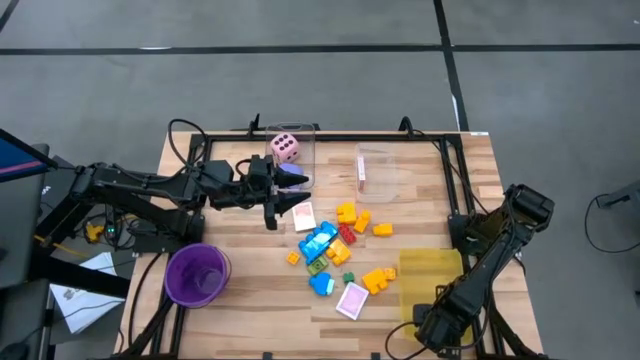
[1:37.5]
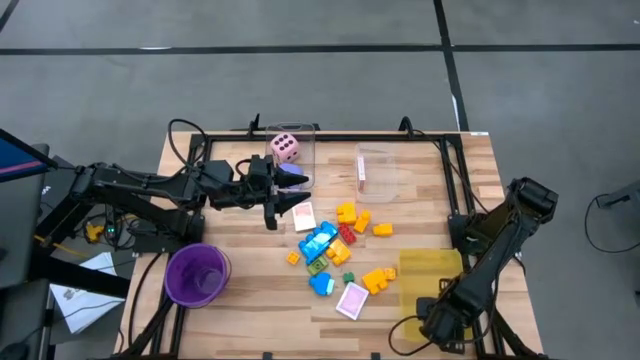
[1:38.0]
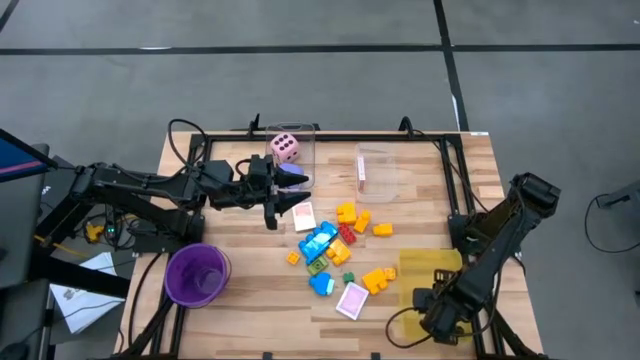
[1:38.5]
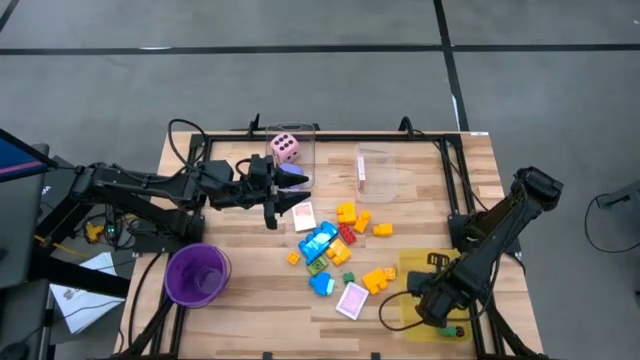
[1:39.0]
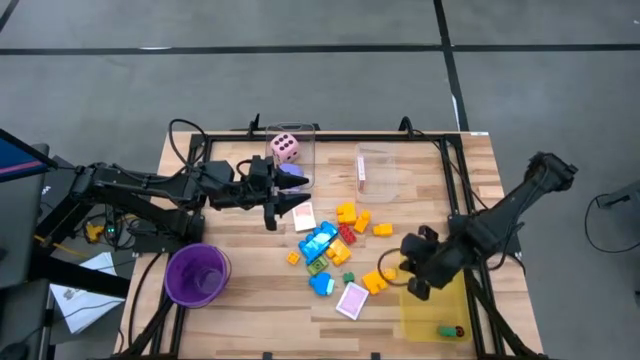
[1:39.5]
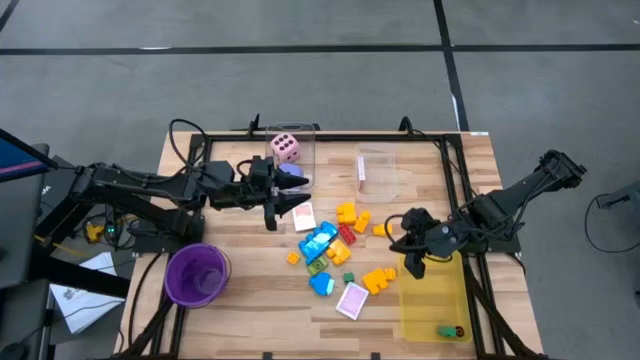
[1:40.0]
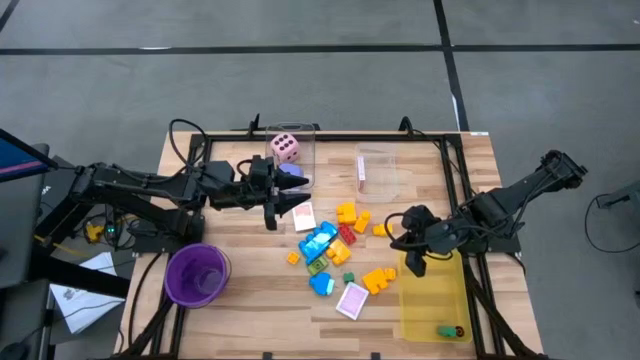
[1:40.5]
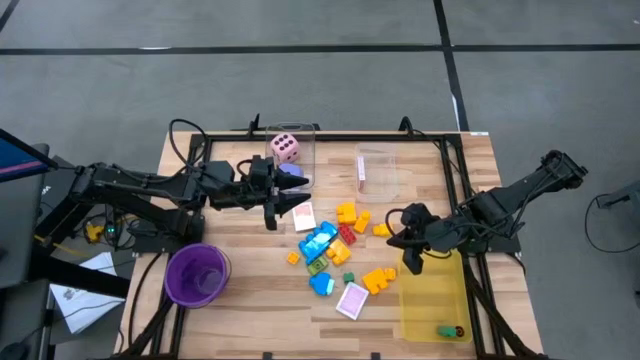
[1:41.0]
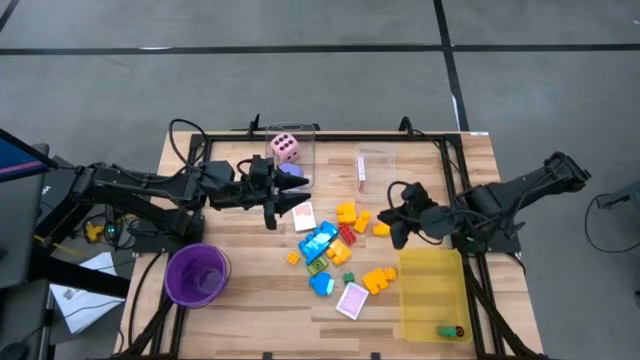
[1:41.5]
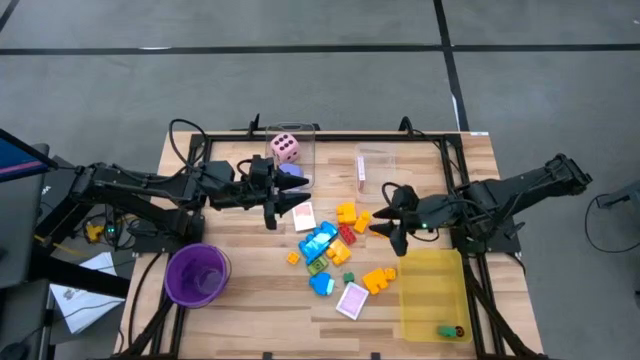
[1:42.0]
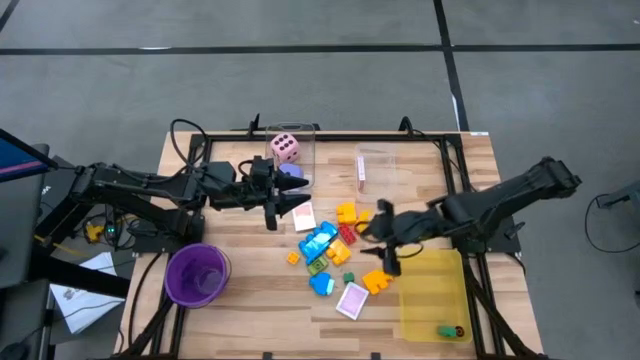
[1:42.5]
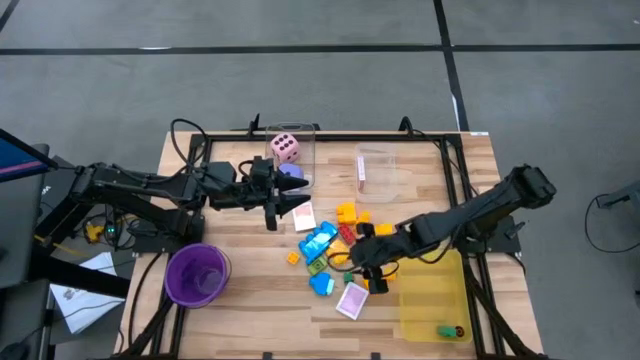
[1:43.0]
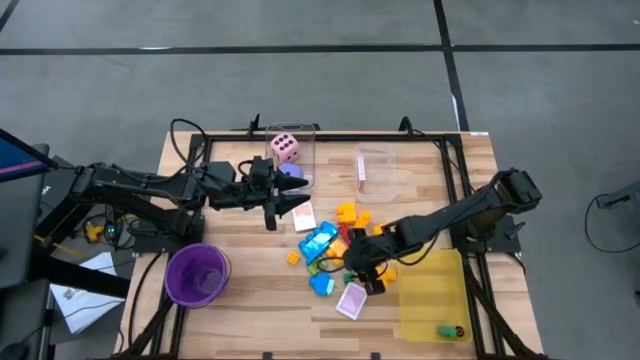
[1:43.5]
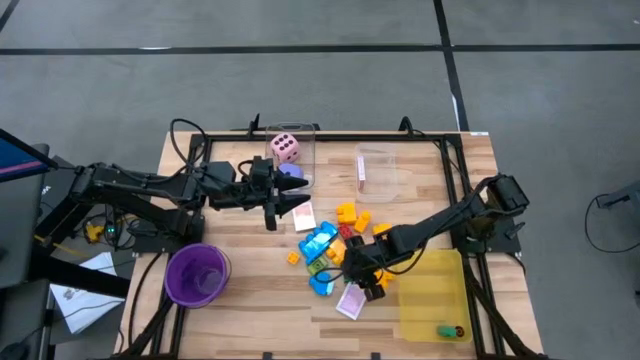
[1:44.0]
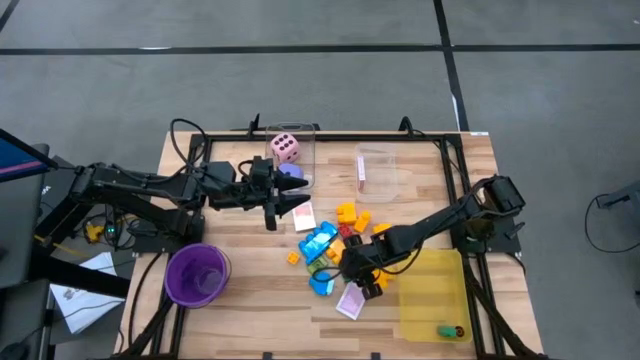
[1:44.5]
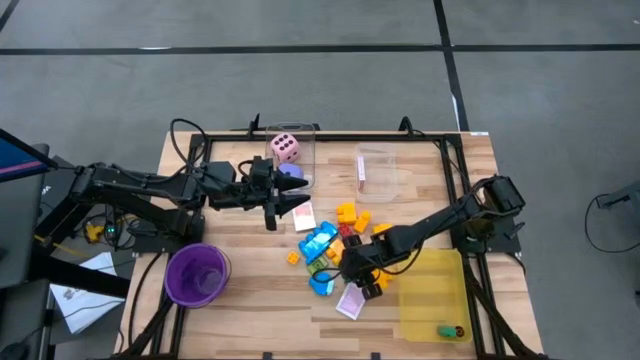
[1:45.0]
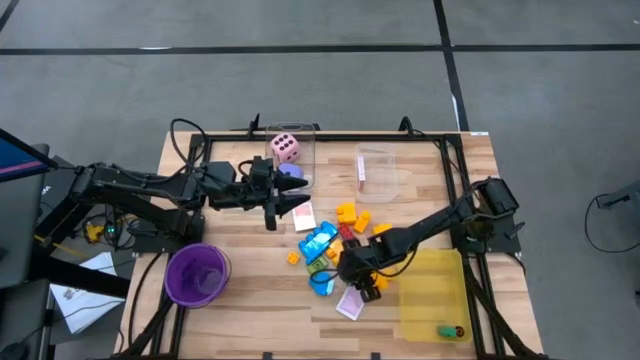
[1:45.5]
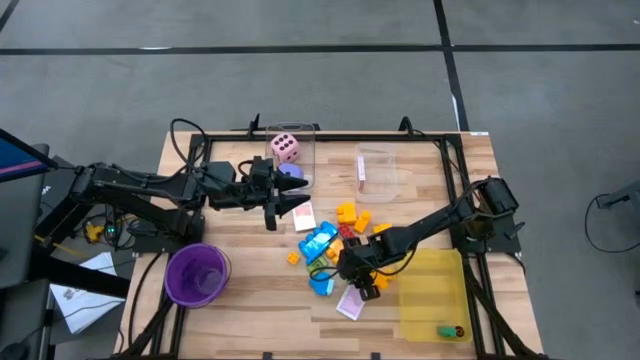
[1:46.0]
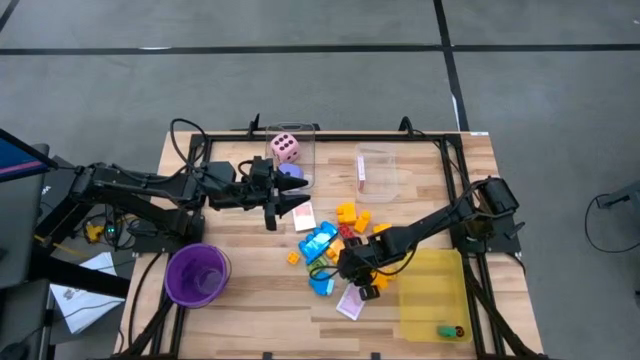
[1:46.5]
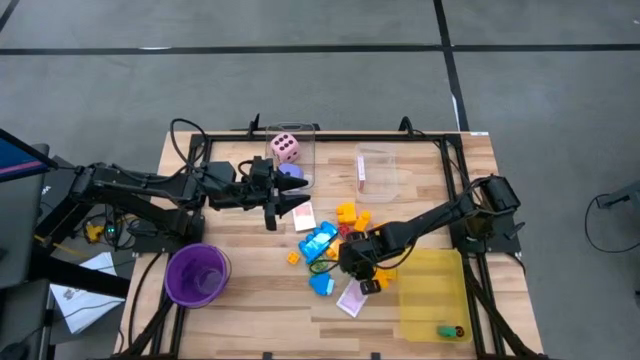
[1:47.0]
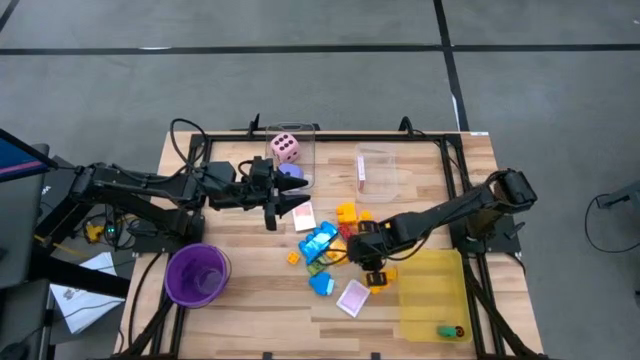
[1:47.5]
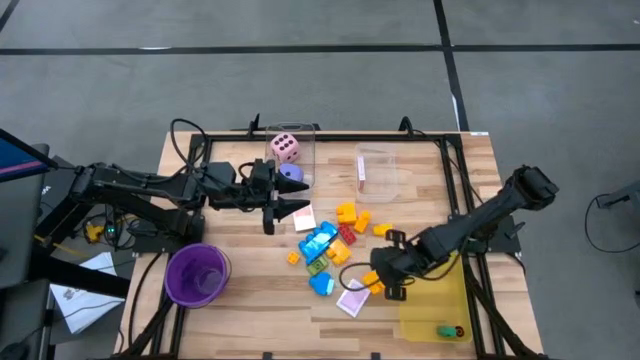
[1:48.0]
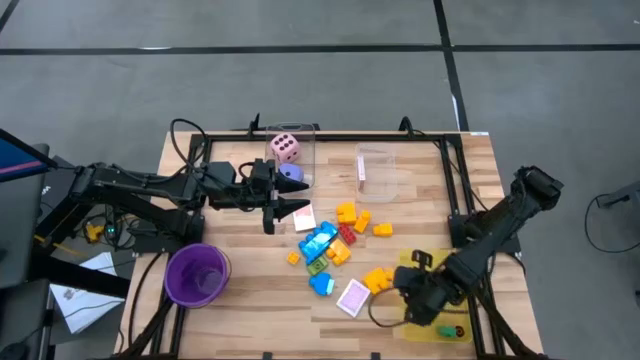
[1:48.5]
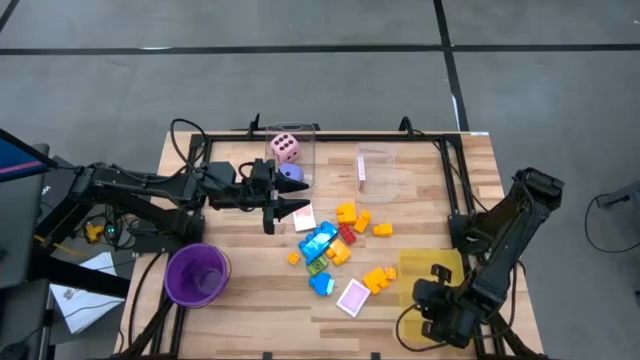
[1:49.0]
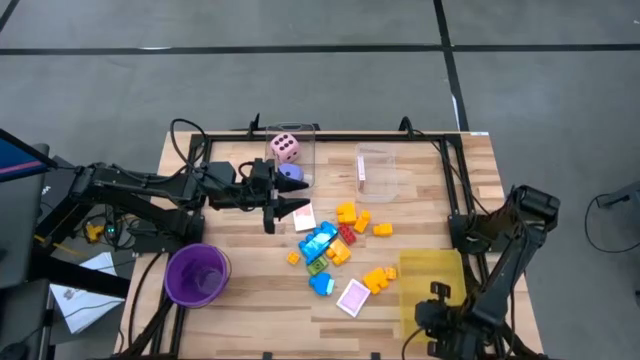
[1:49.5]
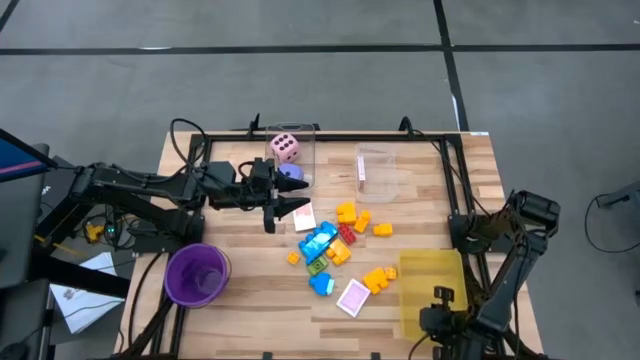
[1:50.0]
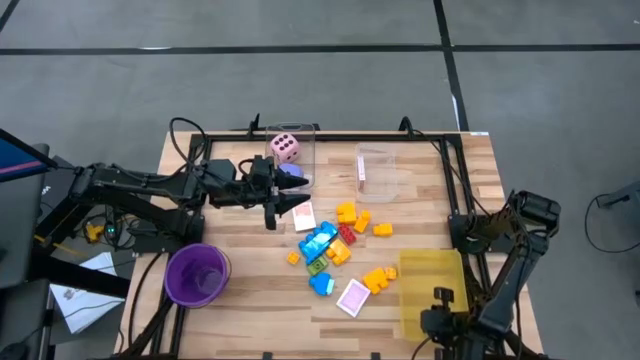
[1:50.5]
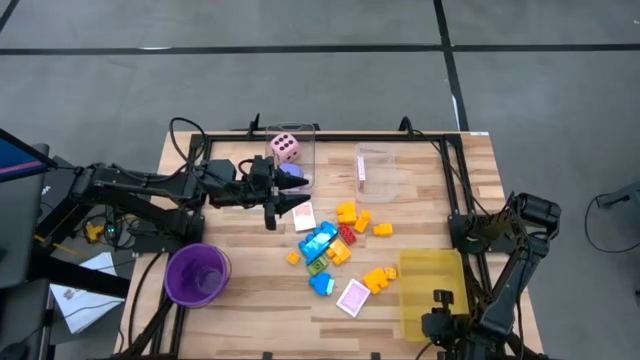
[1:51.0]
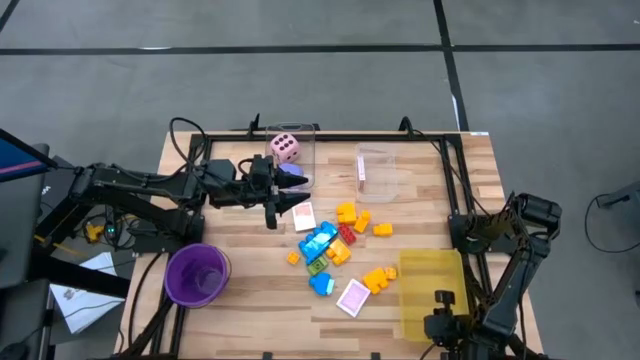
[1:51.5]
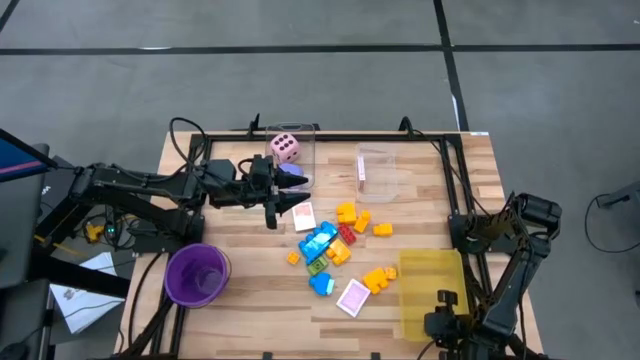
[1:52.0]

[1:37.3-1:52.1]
Task: Pick & Place Toys
Put the green game piece into the bin

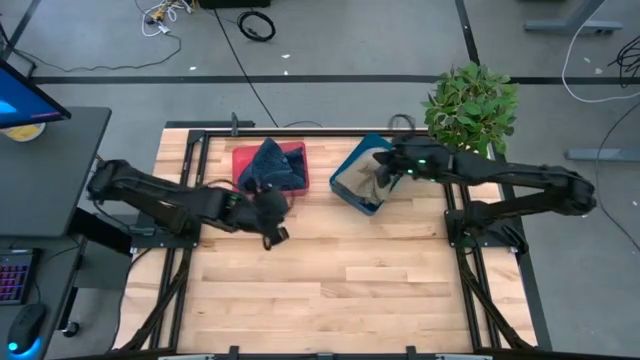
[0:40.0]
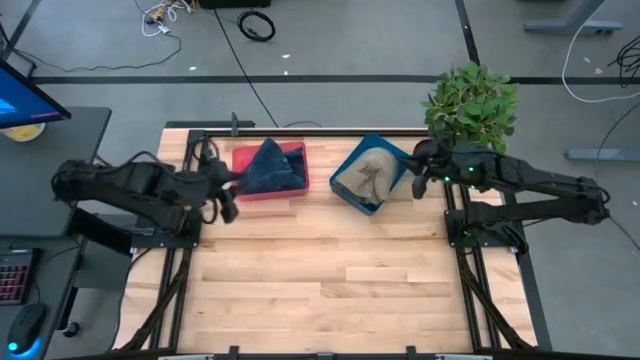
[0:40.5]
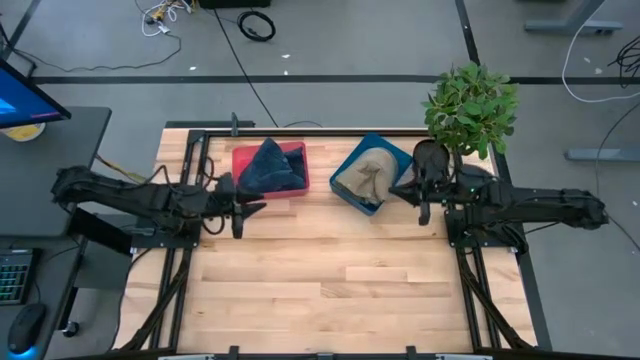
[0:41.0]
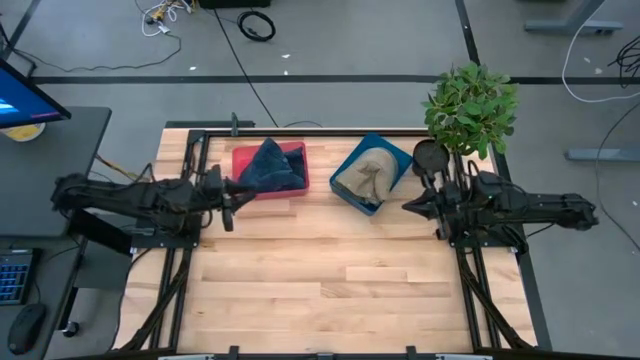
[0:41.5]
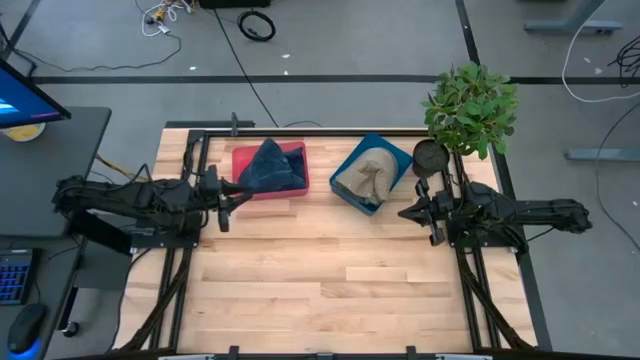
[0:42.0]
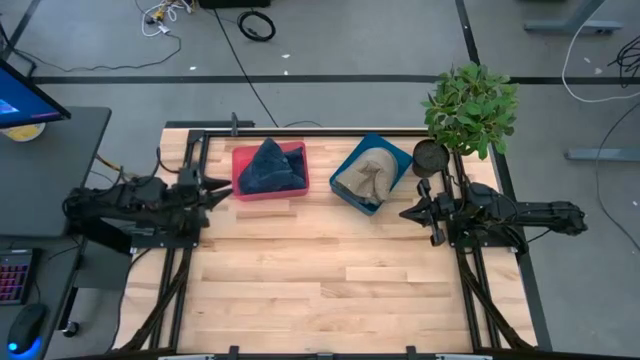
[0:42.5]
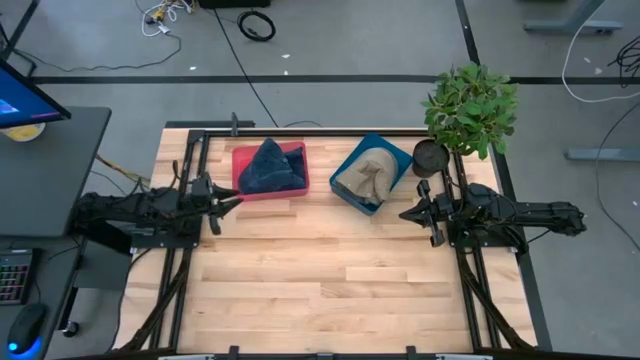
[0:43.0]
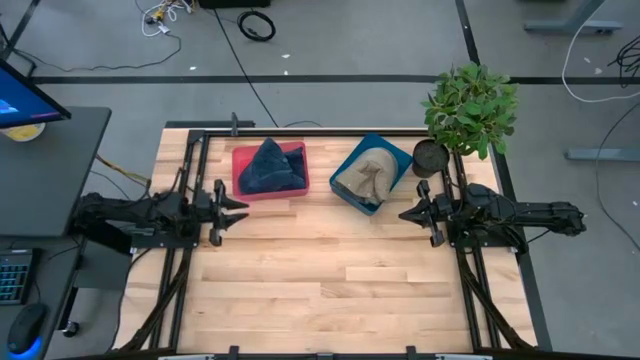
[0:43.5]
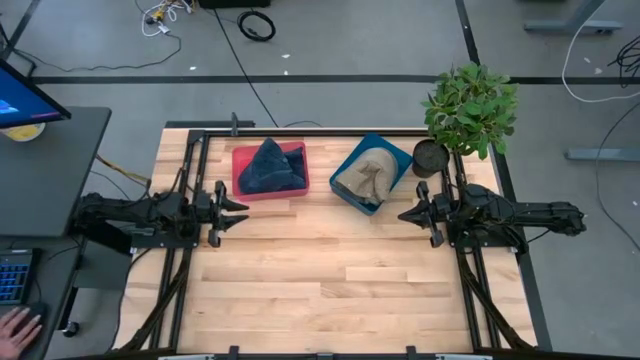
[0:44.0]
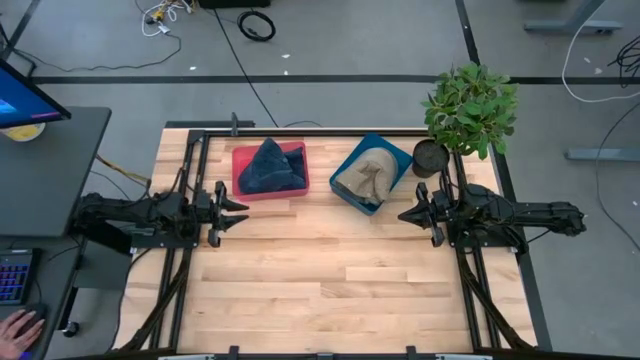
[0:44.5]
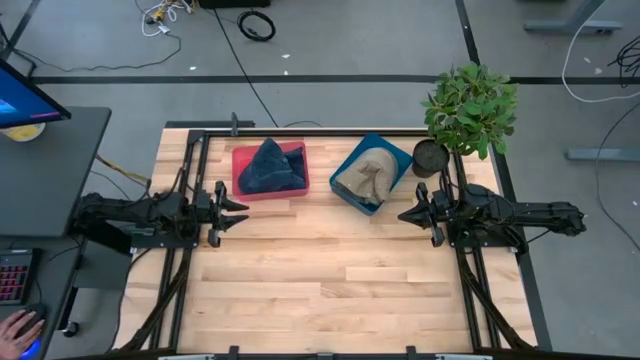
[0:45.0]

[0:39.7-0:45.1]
Task: Pick & Place hat
Return to Home Position
